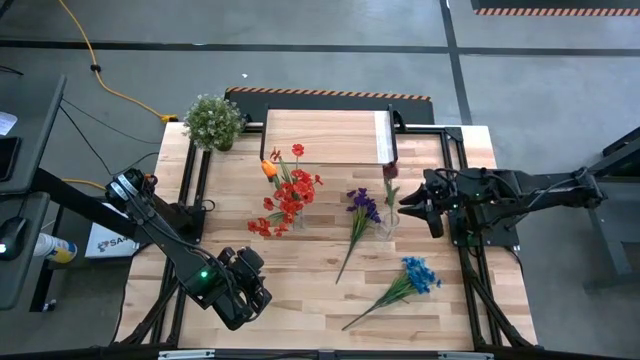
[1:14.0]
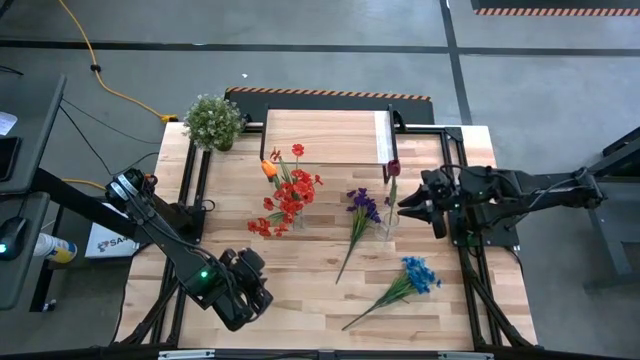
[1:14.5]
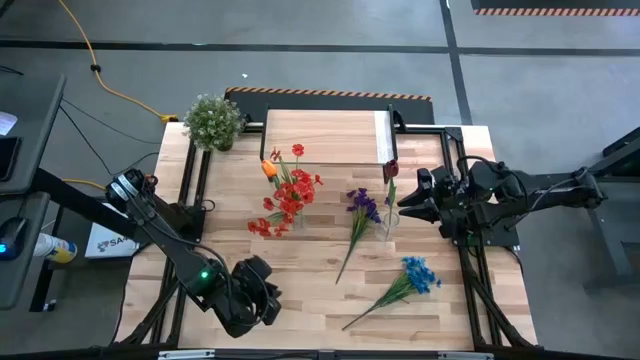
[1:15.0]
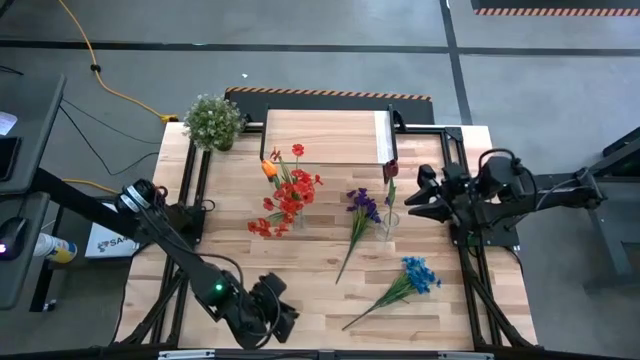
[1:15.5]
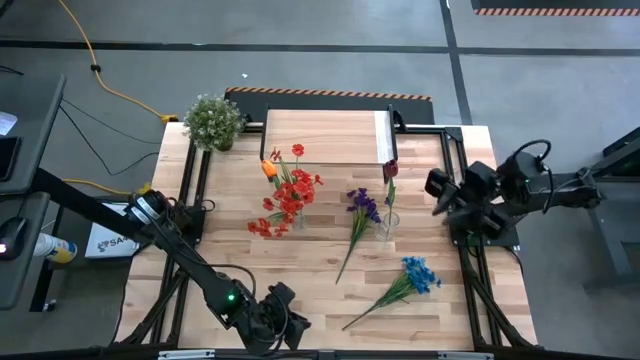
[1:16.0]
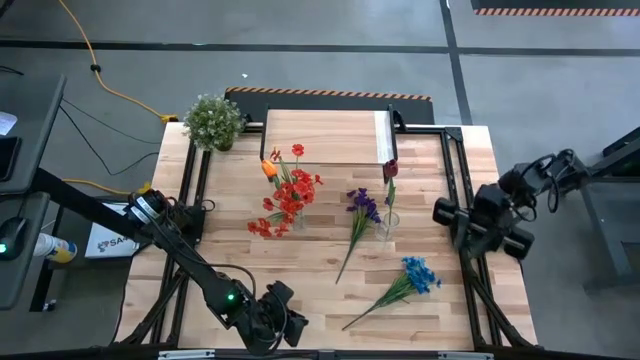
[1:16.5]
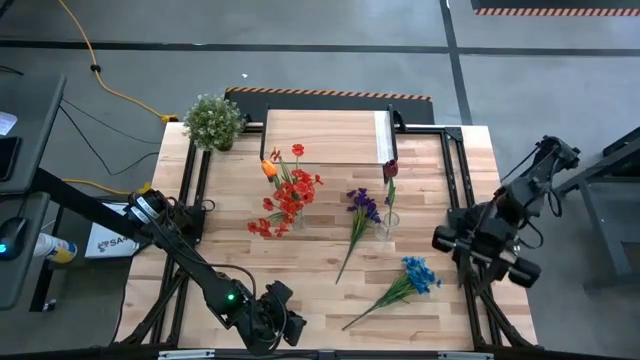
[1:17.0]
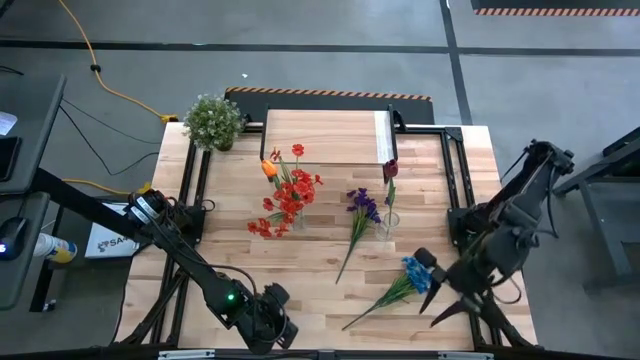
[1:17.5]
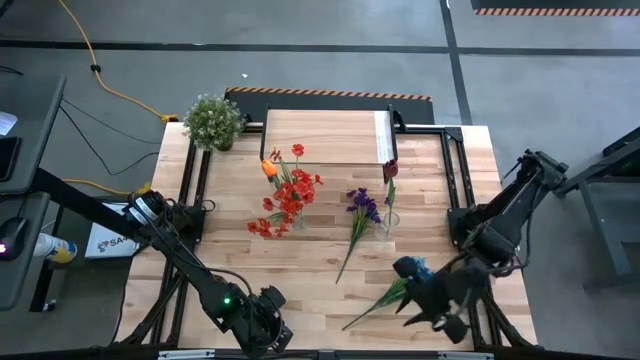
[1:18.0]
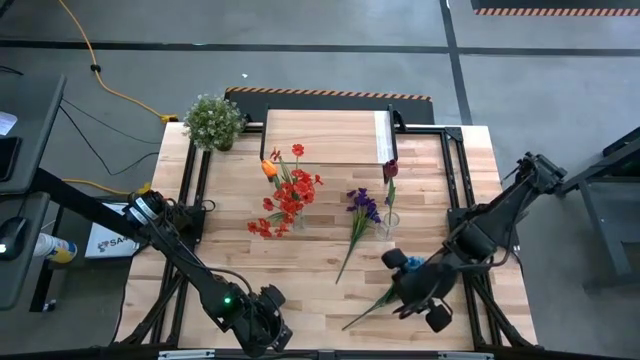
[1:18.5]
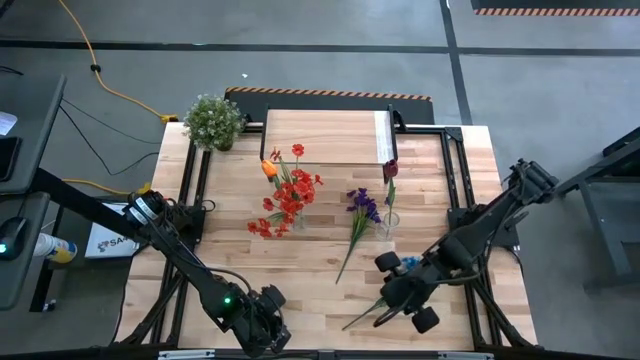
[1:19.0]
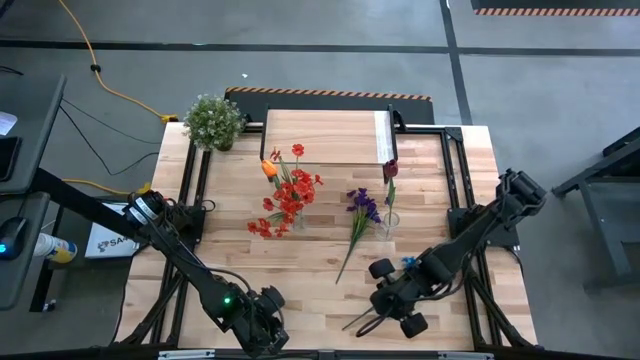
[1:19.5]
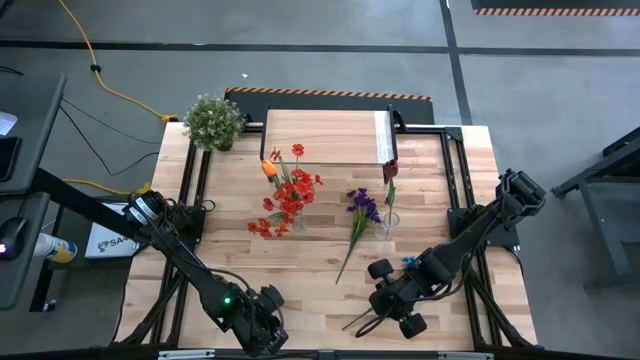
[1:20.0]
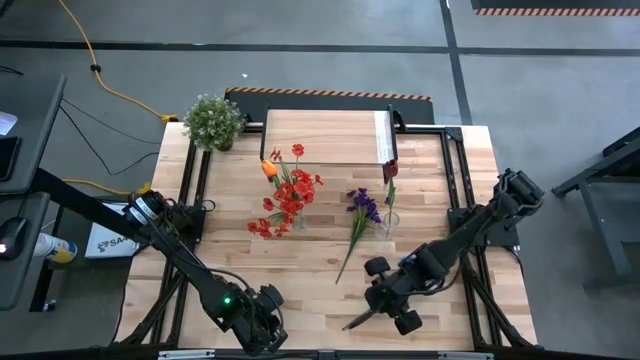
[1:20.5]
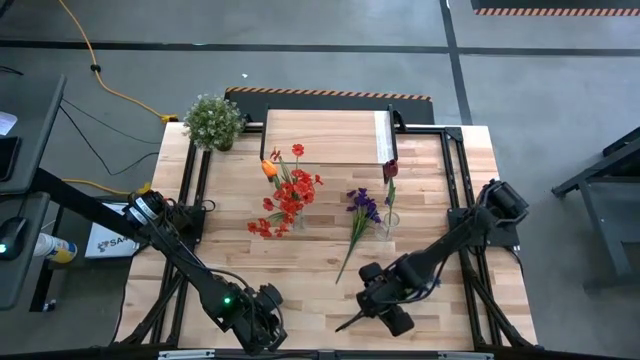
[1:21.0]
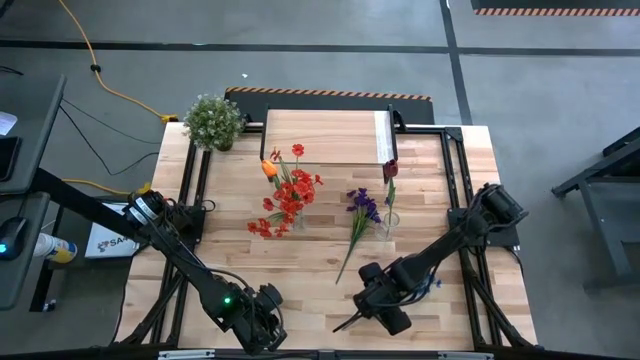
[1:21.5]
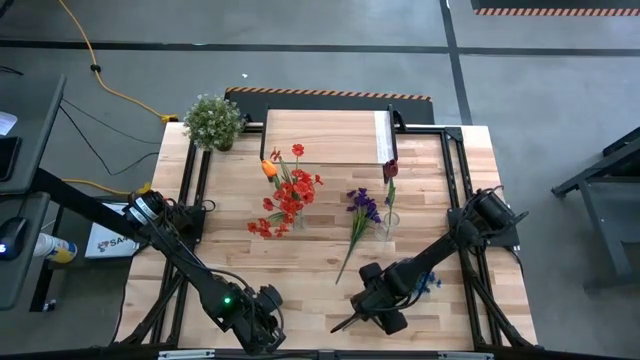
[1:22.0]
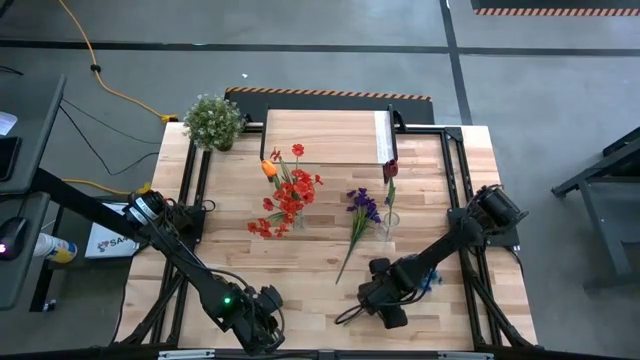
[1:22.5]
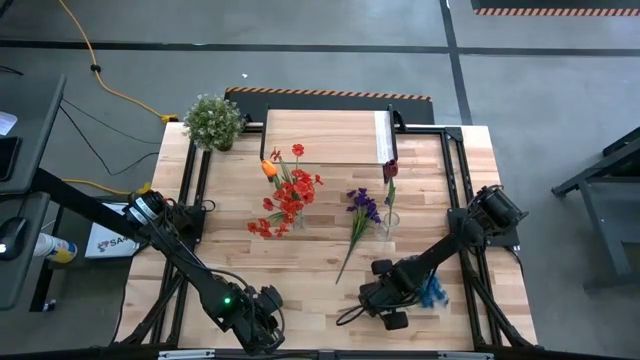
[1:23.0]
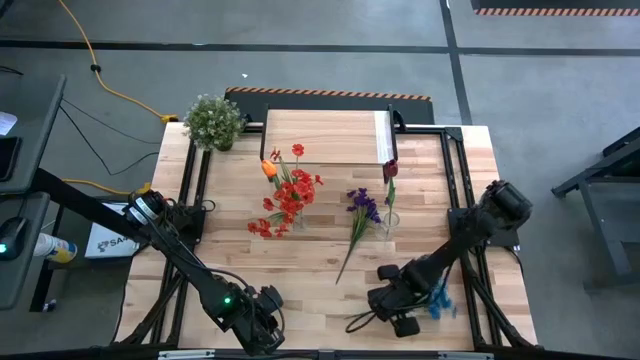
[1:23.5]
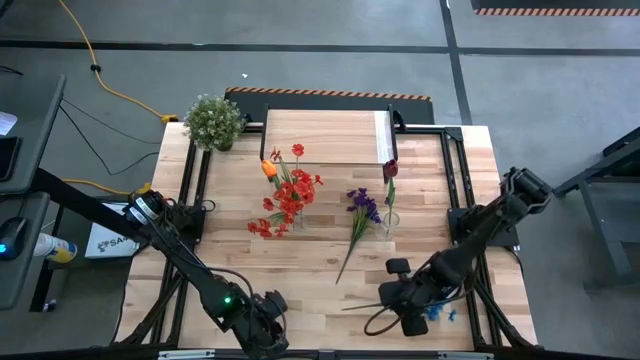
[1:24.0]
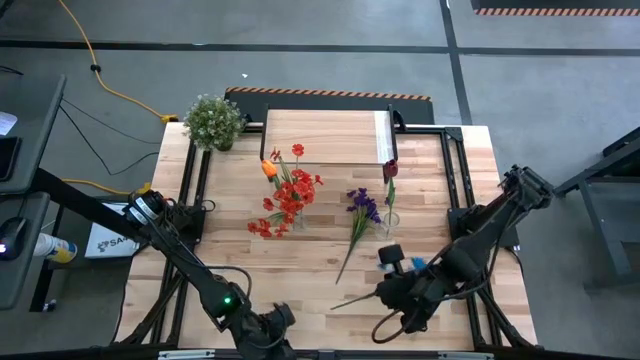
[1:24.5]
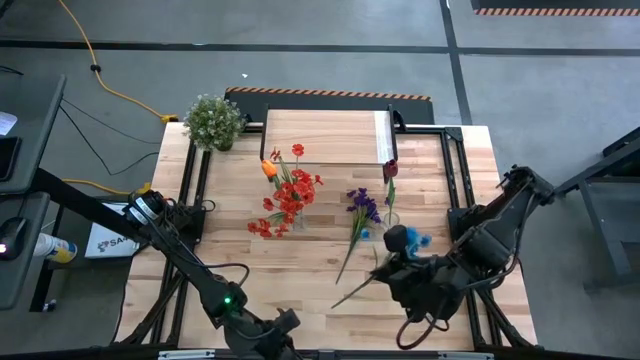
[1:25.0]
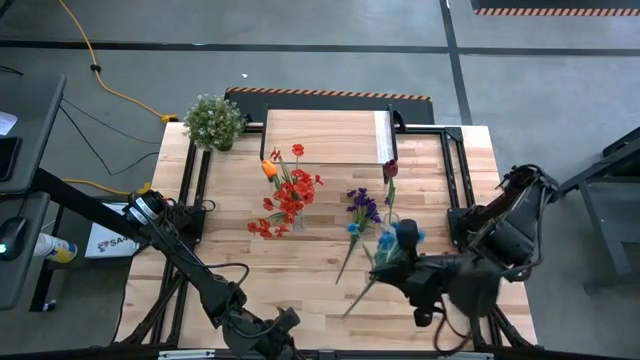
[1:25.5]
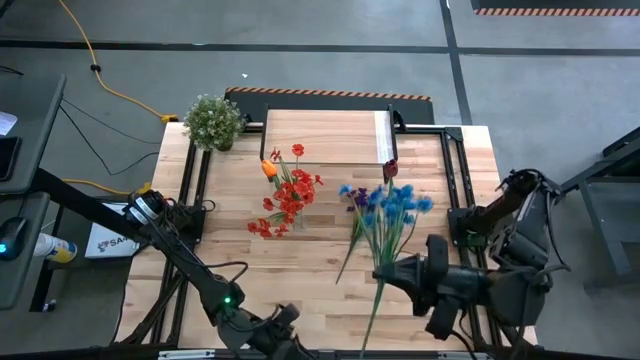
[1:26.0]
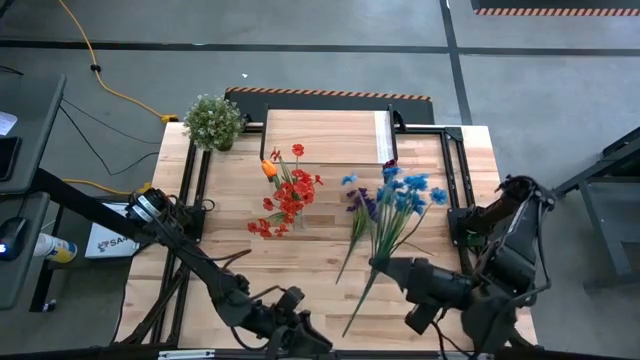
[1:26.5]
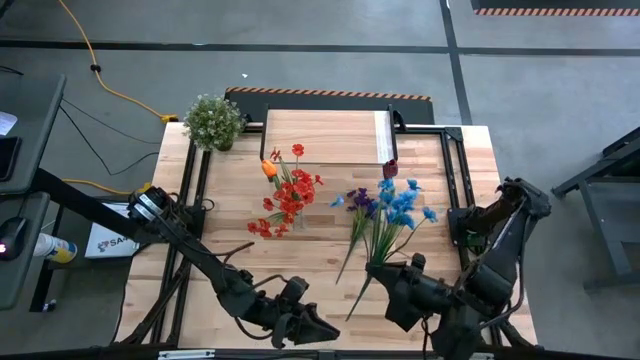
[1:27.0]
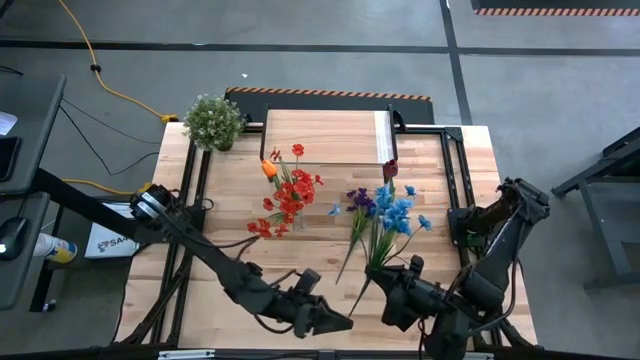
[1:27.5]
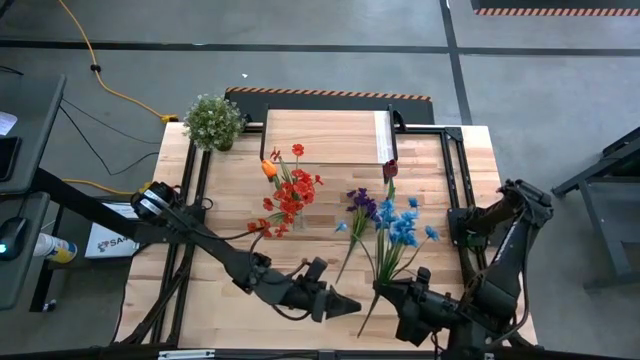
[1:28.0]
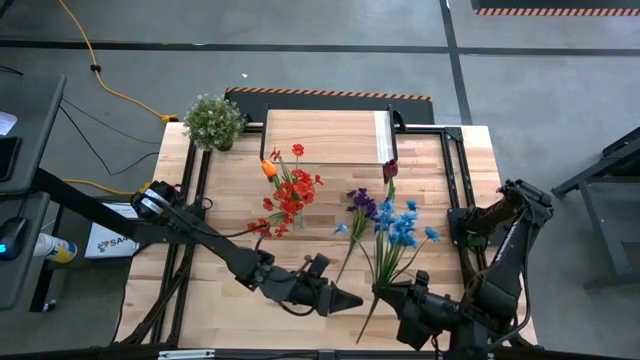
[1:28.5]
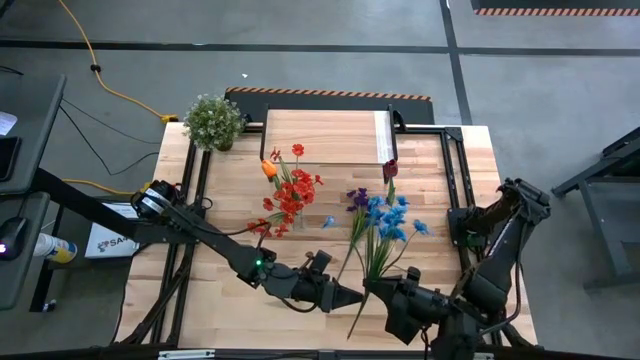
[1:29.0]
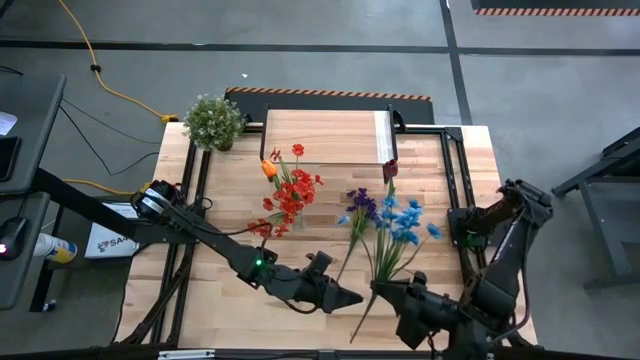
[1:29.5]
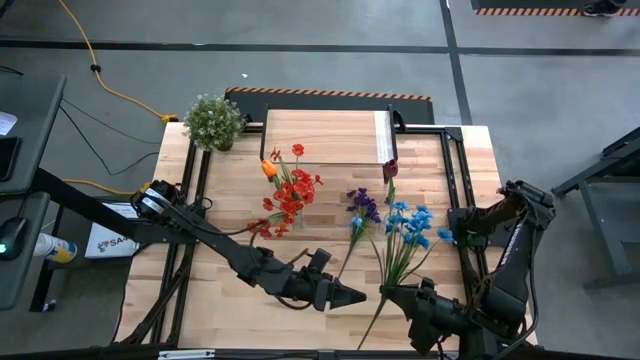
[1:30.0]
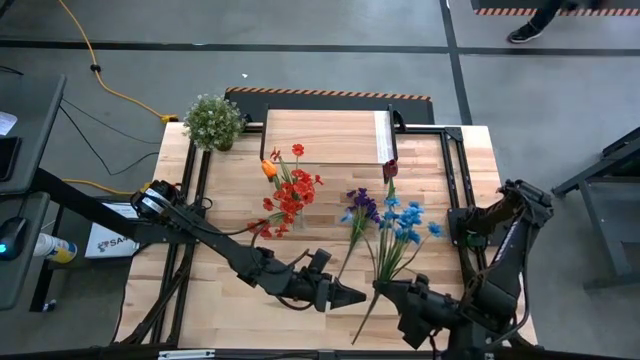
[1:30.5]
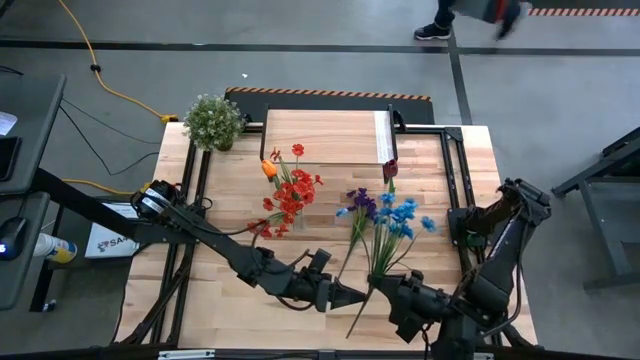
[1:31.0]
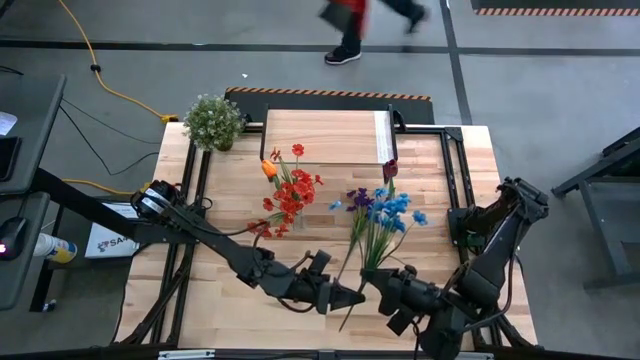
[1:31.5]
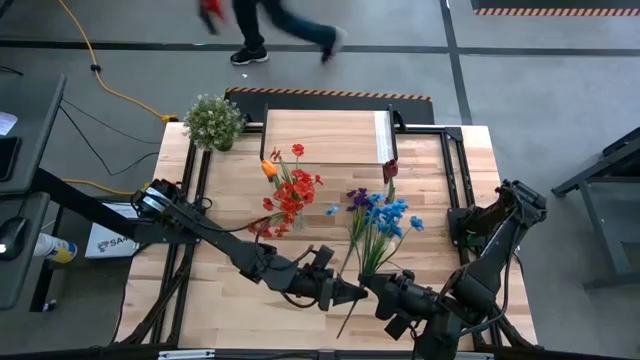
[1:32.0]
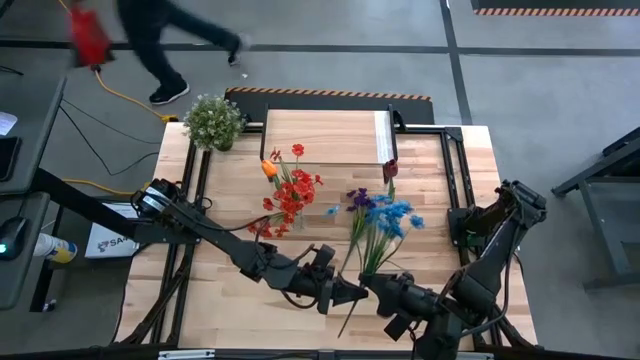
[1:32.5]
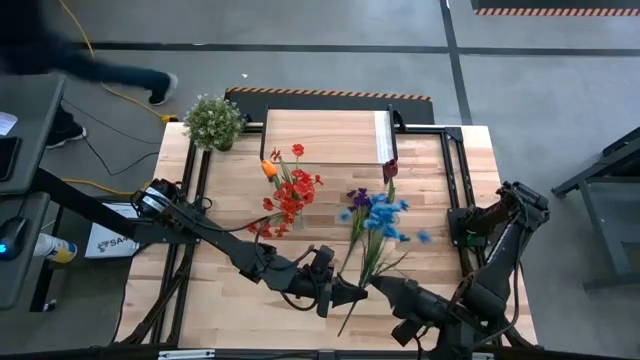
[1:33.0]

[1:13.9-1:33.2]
Task: Pick and place flowers into a vace then onto a shelf
Put the blue flowers into the right transparent vase

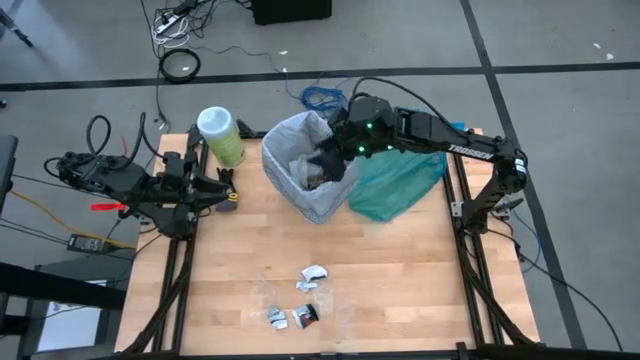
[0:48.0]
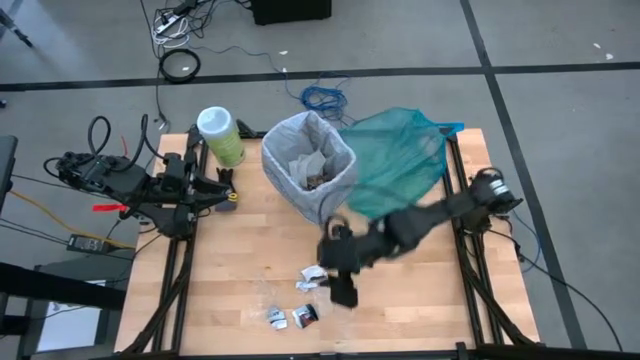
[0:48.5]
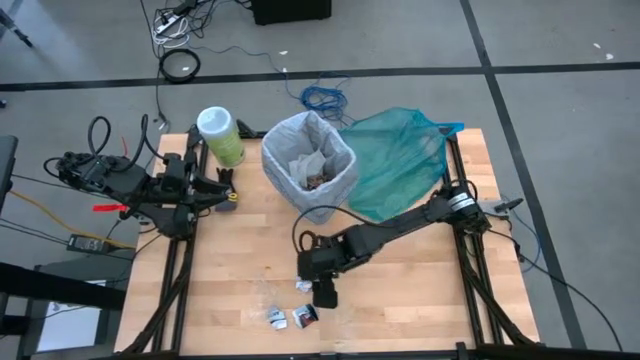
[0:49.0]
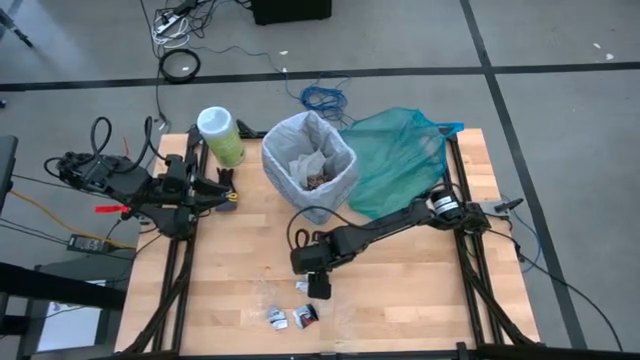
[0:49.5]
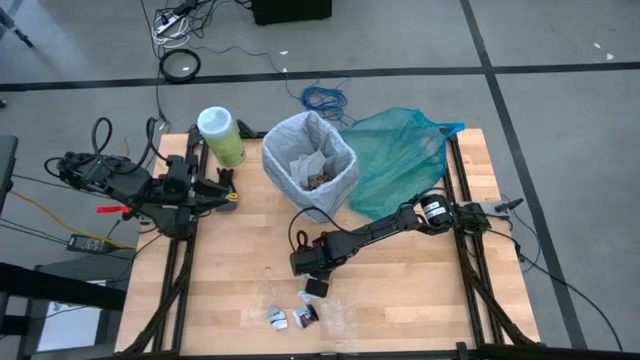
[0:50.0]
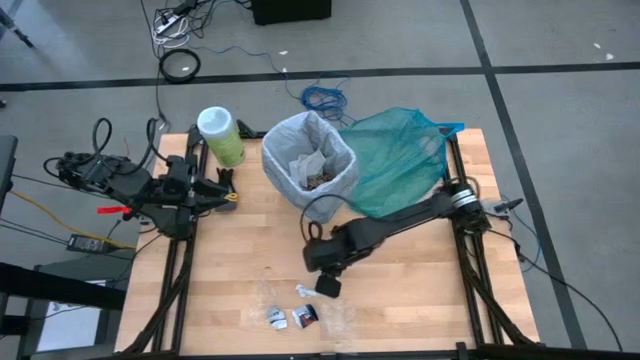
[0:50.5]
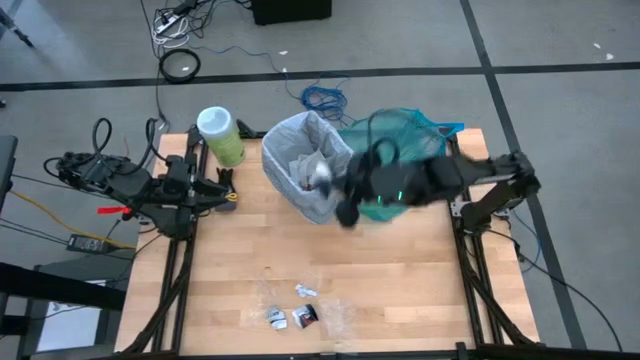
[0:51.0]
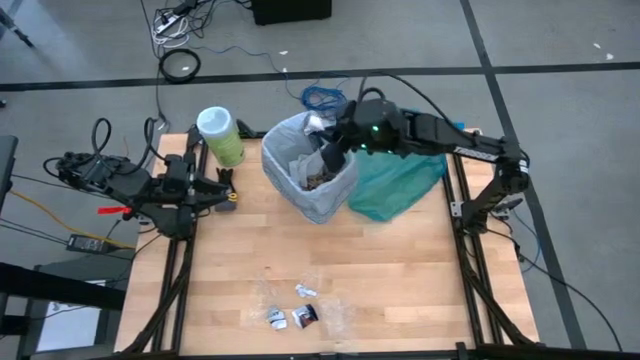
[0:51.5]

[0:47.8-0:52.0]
Task: place trash/remove bag and relplace
Put the dark blue paper into the trash bin
